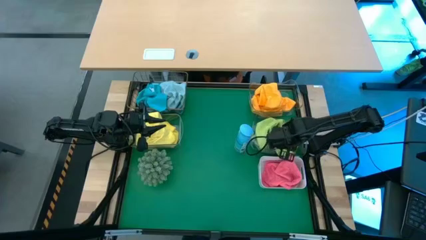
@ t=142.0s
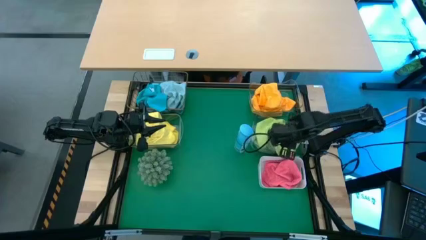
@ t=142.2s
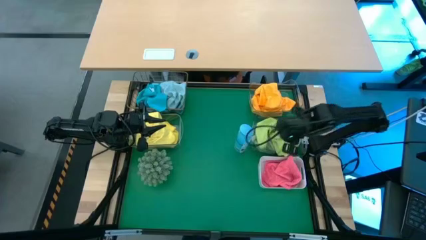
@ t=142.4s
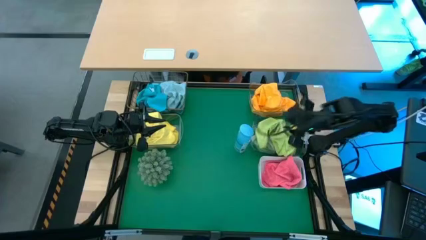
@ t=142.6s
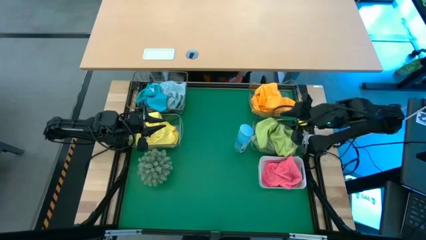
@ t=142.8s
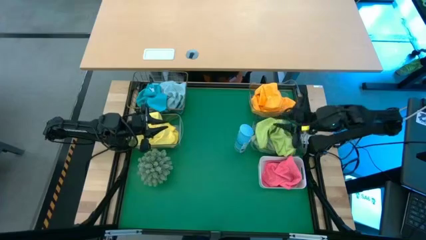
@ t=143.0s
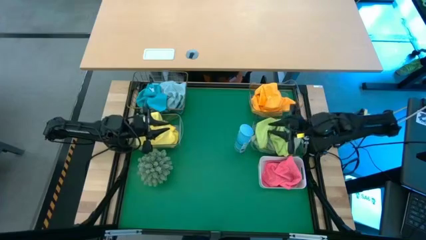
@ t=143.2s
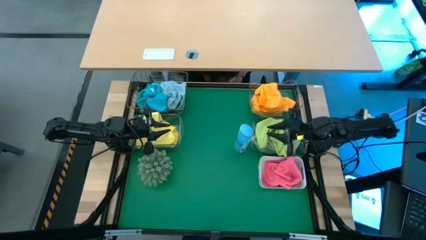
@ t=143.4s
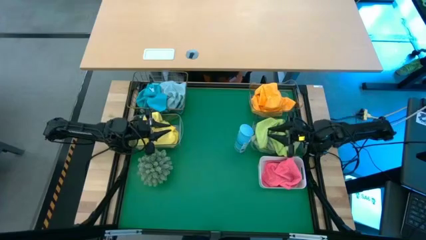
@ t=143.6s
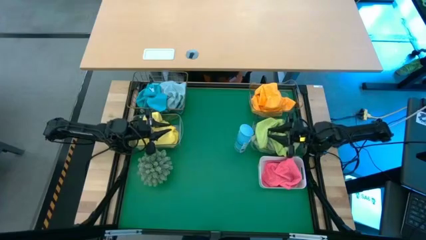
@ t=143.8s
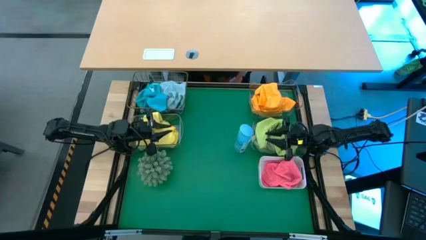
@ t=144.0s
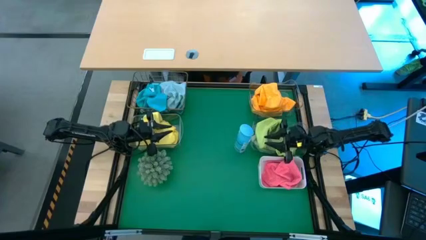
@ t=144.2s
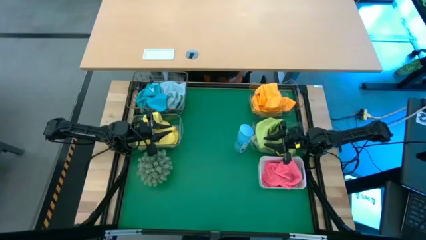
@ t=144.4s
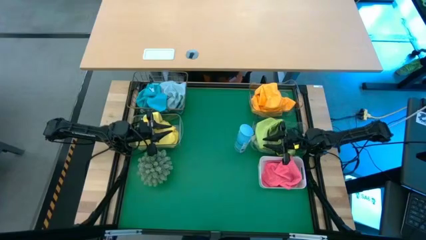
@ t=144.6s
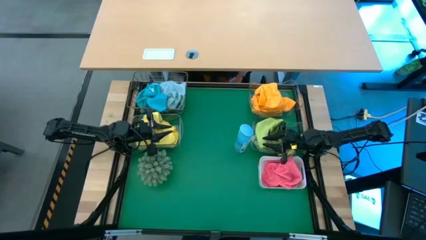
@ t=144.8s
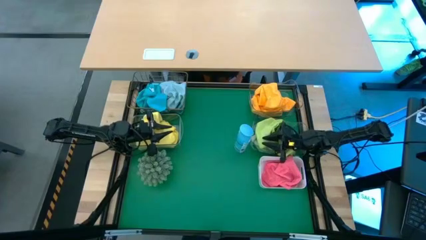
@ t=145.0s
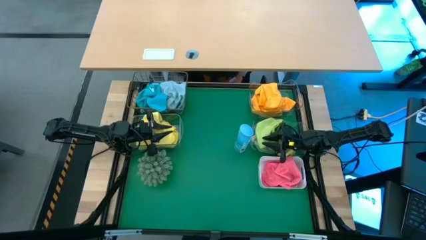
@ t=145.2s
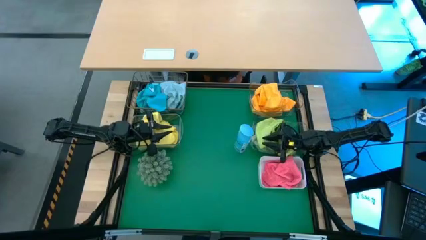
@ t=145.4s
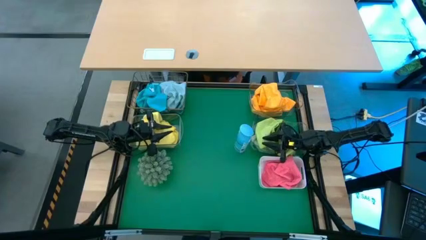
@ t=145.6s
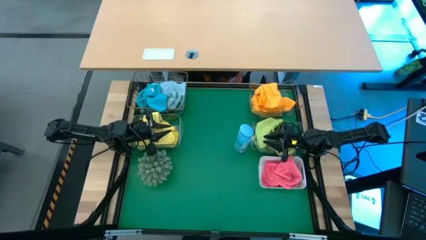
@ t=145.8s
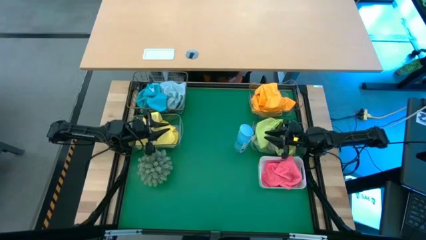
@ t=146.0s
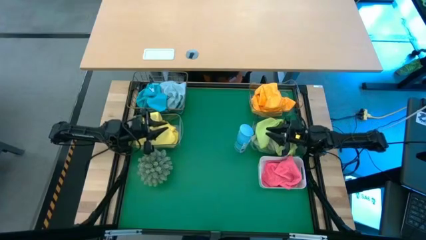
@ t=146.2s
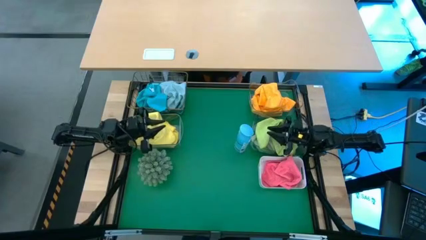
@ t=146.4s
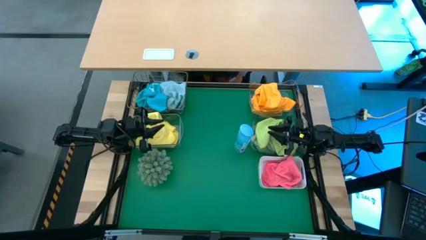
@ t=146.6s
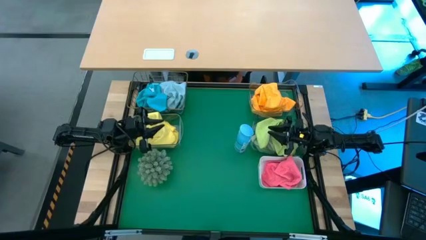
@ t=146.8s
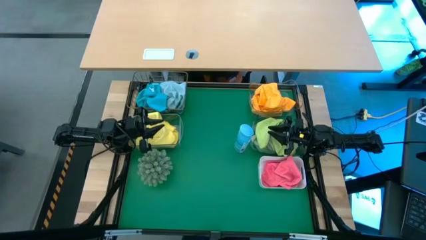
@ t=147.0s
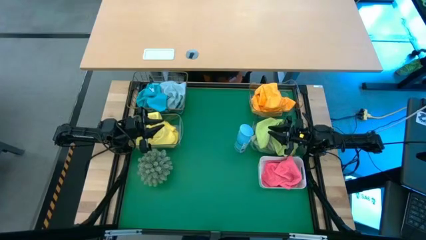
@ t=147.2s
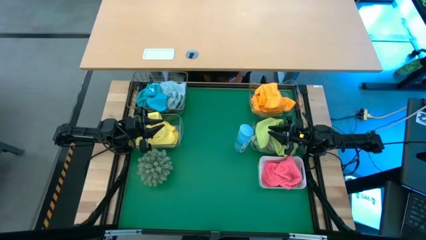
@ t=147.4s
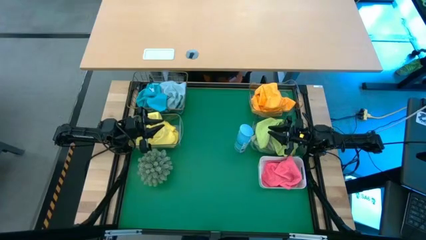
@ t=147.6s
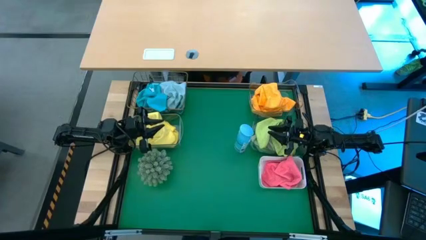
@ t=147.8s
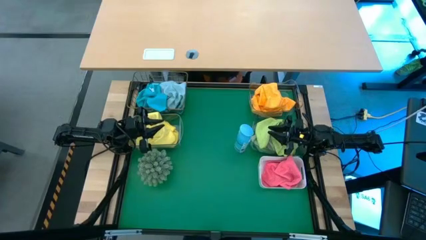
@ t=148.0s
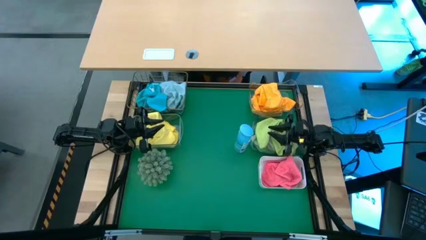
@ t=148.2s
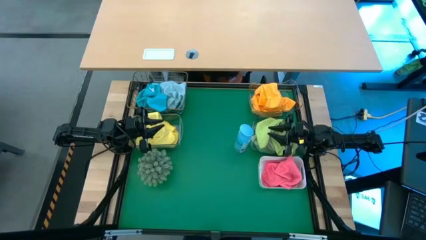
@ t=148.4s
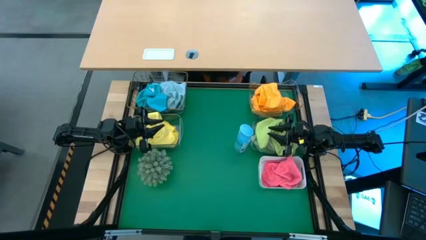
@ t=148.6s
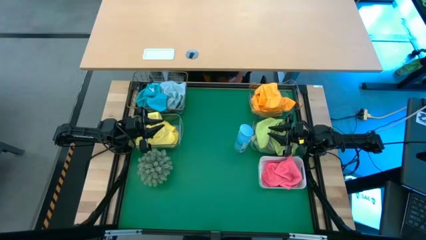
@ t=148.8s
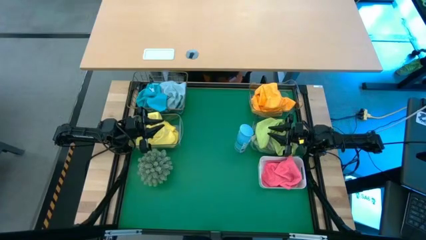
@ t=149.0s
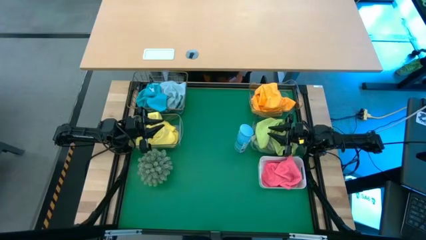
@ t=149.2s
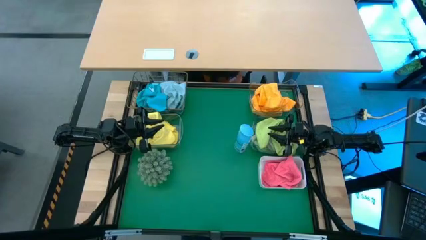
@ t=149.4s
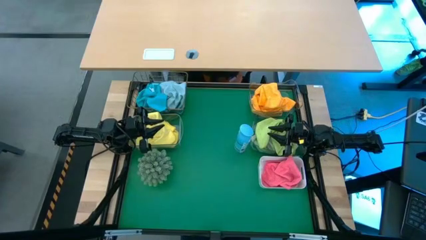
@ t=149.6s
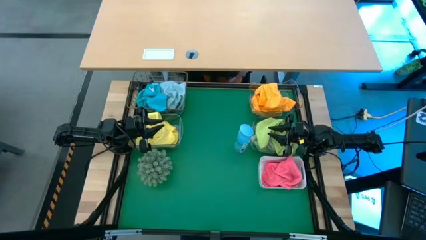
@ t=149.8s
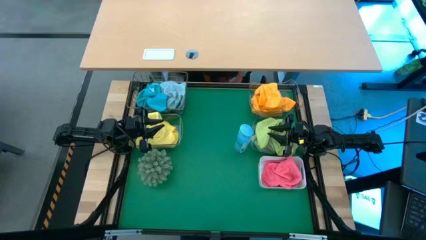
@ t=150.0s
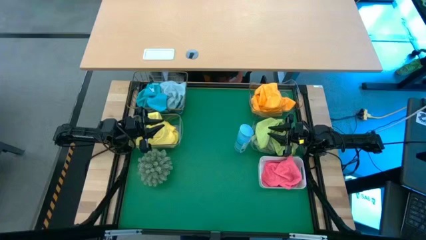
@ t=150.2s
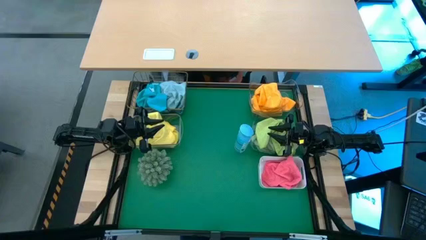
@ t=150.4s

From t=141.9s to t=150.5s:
Task: Sort microfiber towel by color & place in baskets
Return to Home Position

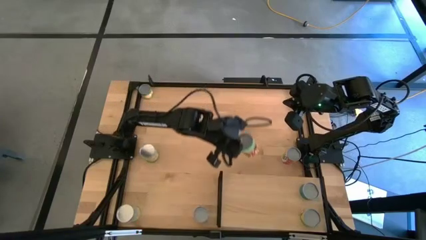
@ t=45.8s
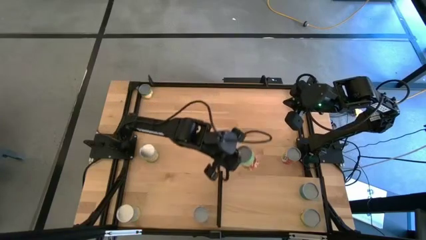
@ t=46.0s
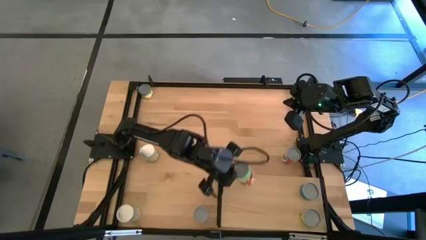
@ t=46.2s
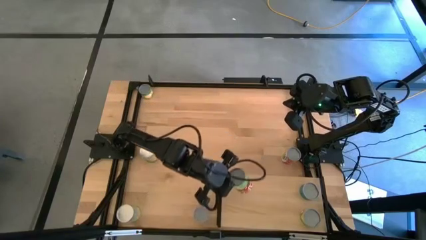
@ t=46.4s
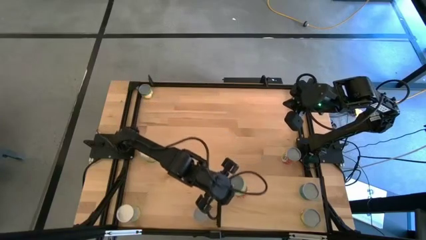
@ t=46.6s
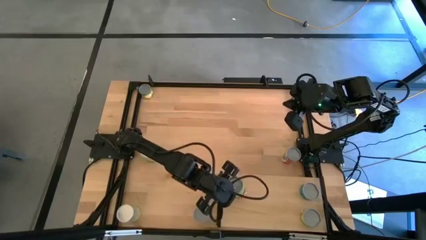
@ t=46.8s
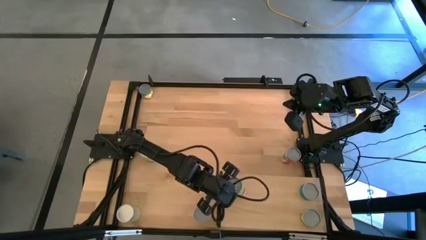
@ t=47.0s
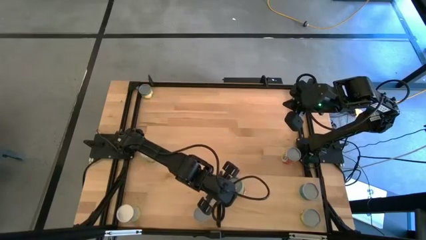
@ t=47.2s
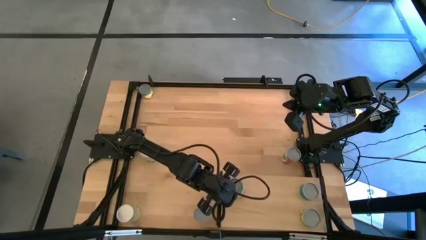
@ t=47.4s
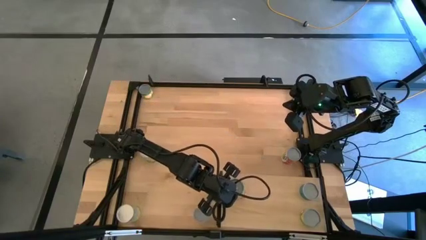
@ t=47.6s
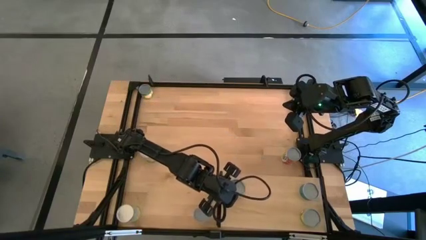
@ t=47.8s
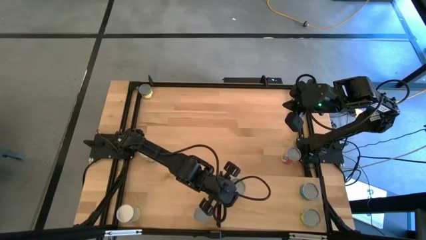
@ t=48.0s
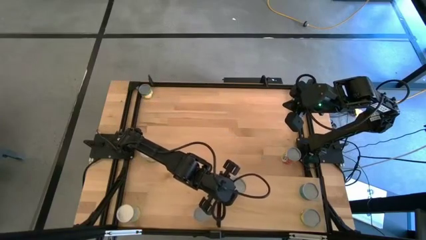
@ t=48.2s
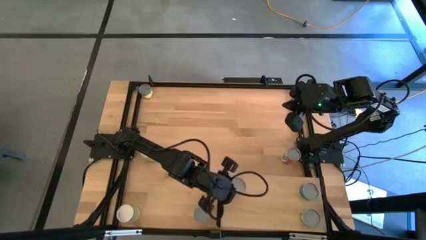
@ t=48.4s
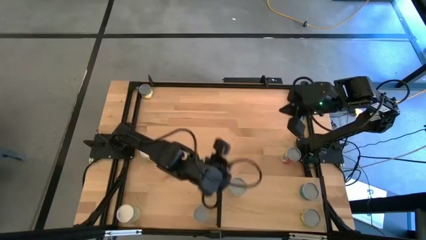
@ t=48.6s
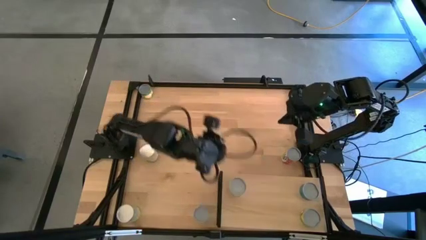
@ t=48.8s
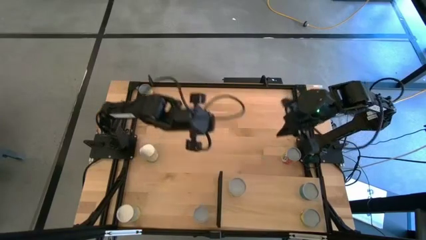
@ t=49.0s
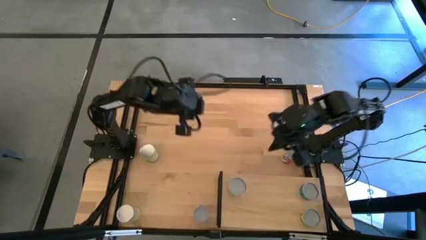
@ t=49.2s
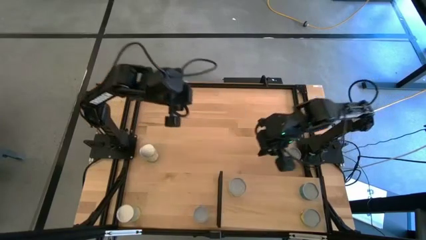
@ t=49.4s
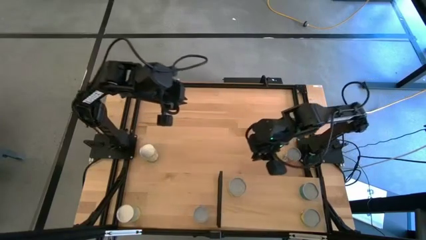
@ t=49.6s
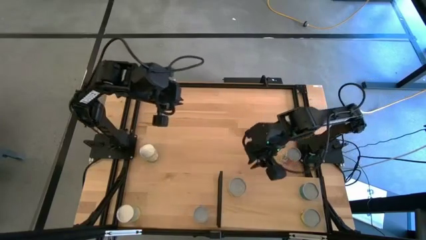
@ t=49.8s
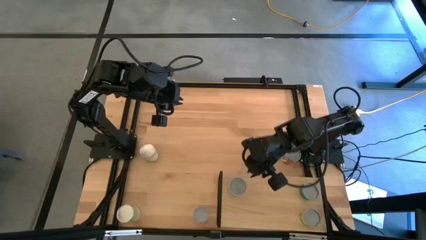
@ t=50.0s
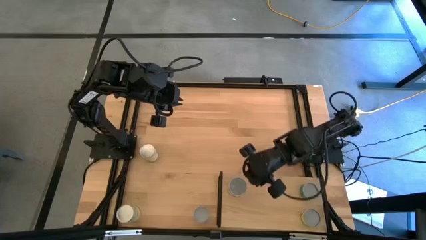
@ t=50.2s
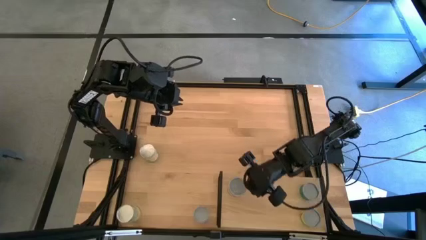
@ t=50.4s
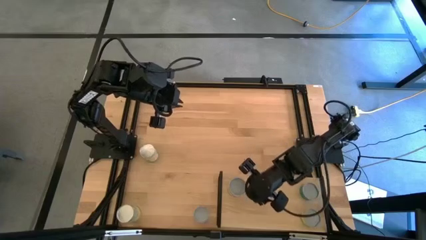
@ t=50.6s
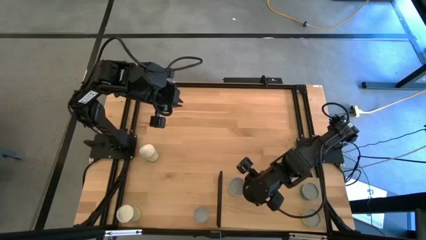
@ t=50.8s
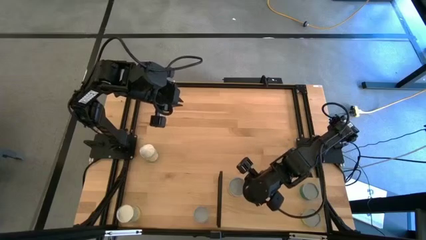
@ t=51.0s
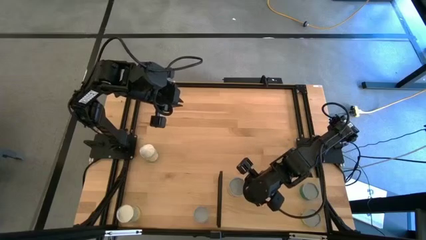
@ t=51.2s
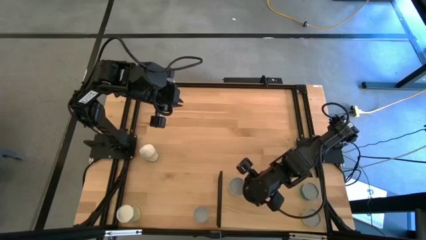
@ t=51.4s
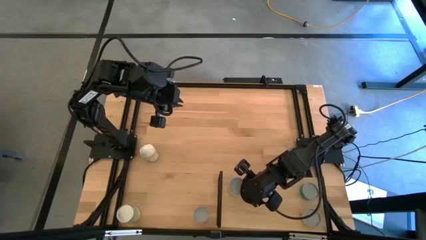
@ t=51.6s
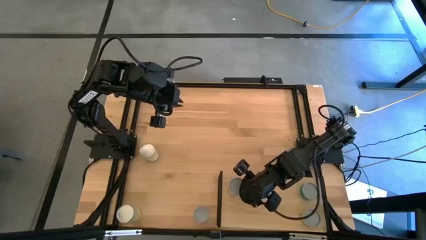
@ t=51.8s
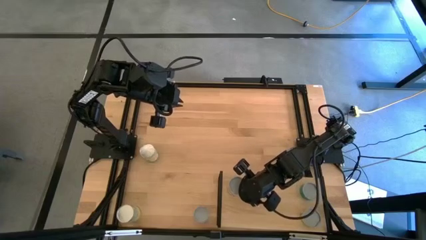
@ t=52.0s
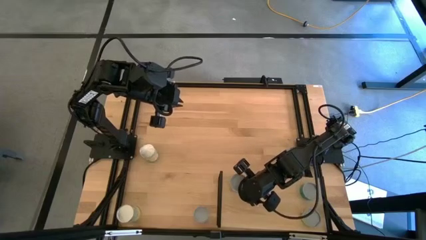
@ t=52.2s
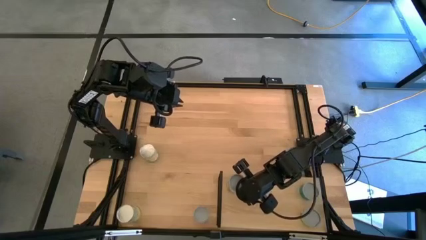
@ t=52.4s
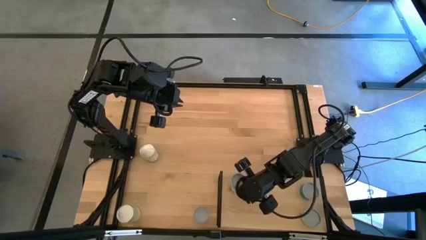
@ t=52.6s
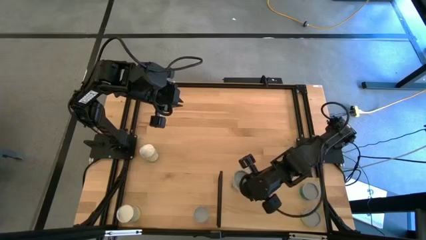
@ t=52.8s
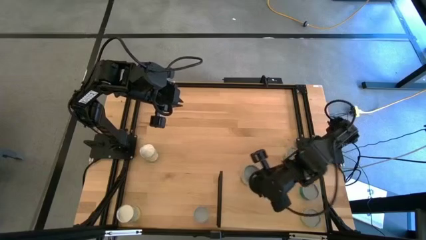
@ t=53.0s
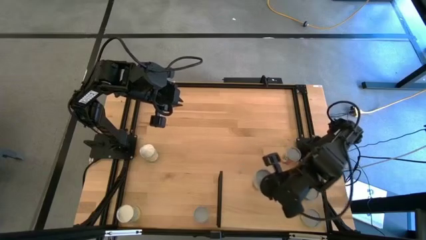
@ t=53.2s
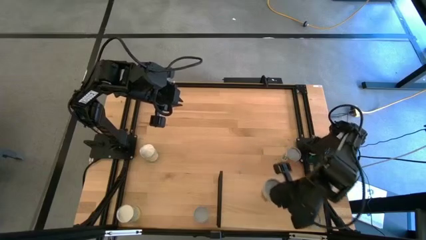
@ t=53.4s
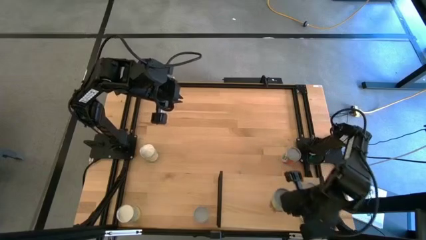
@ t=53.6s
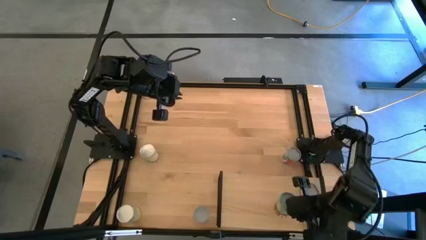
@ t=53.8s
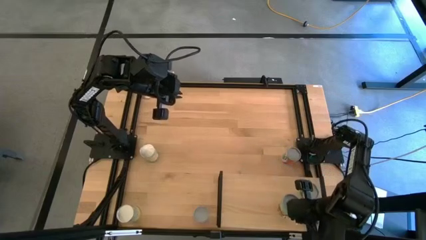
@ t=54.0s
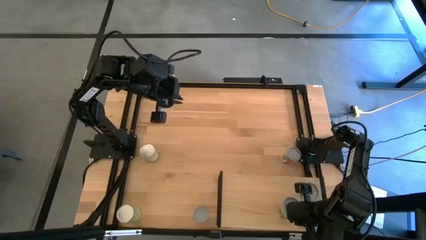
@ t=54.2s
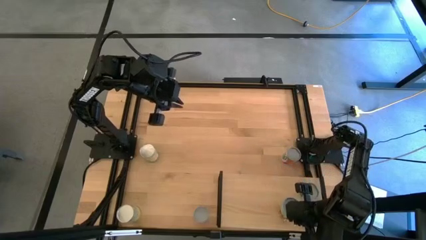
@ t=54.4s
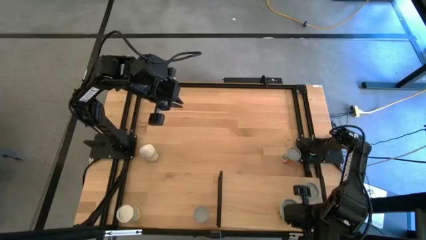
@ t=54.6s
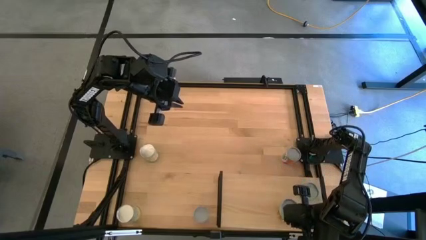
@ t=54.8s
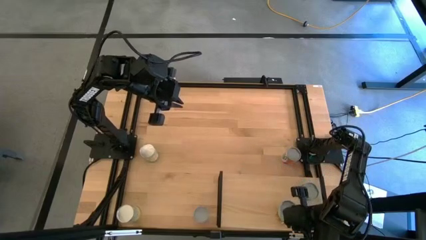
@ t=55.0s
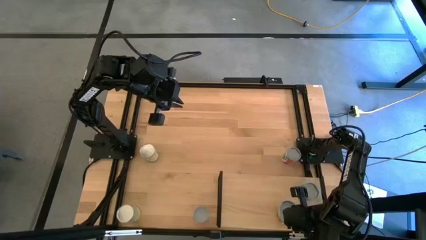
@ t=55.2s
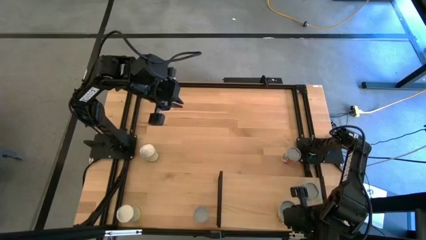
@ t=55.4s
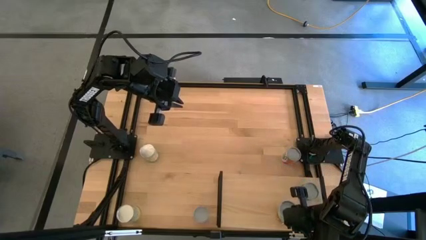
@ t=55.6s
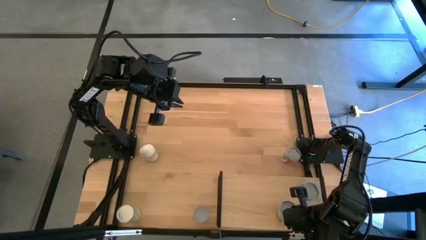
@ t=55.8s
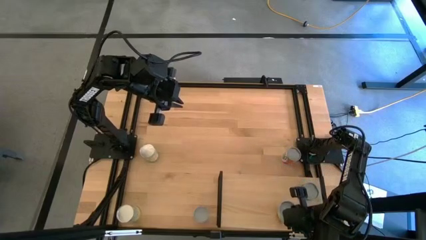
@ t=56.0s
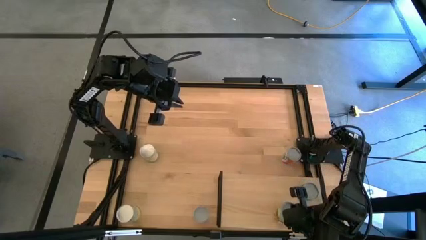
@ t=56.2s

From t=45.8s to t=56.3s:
Task: Pick and place cans onto a shelf
Put the canned spaghetti sauce on the shelf
